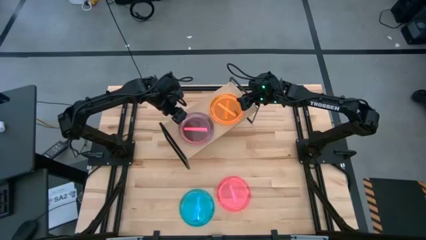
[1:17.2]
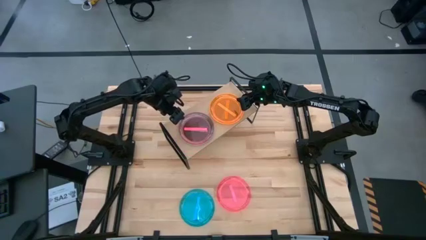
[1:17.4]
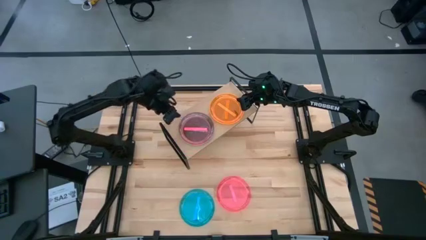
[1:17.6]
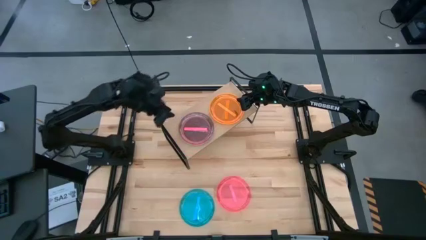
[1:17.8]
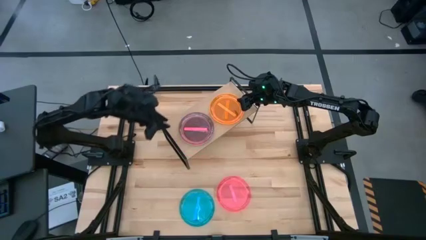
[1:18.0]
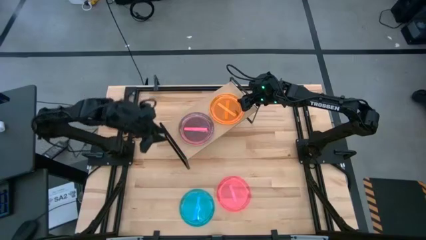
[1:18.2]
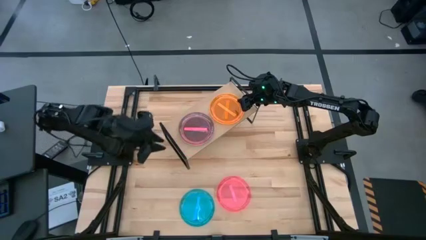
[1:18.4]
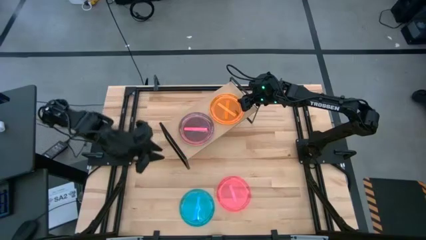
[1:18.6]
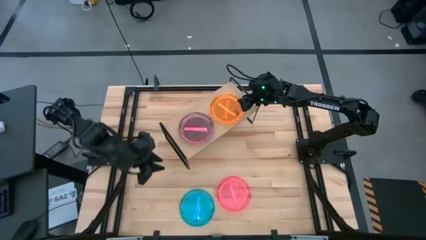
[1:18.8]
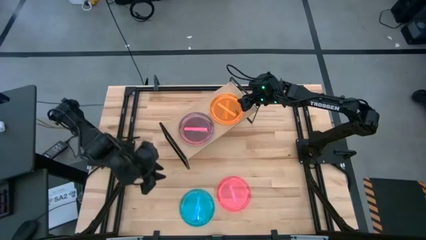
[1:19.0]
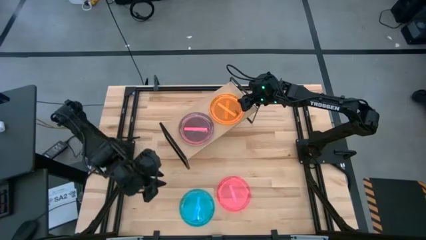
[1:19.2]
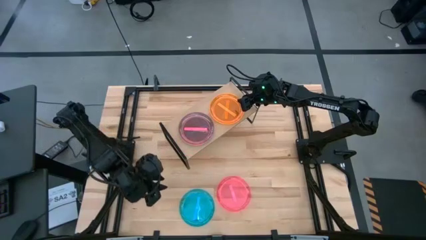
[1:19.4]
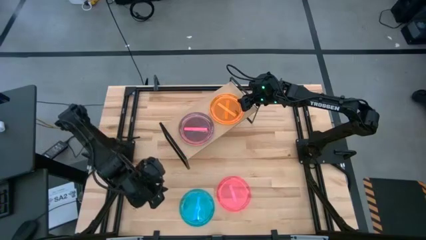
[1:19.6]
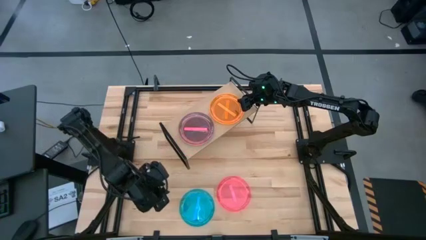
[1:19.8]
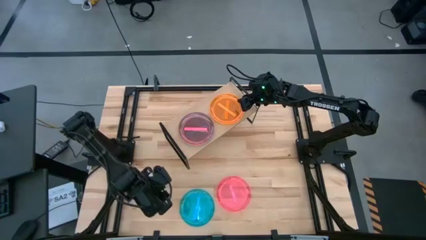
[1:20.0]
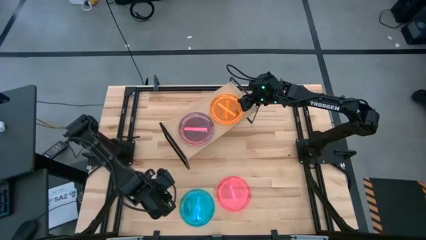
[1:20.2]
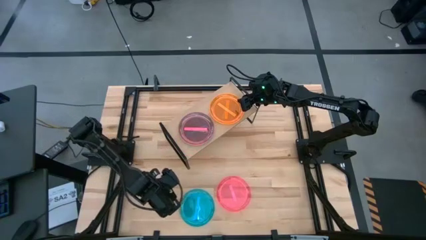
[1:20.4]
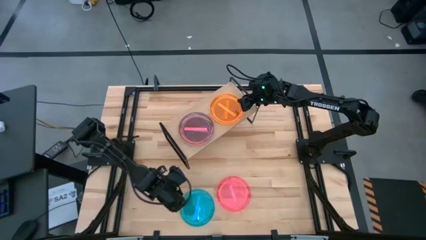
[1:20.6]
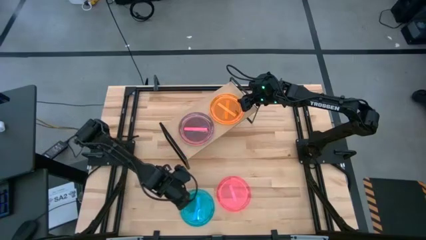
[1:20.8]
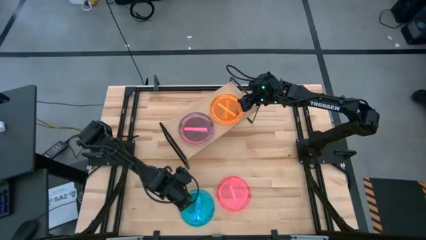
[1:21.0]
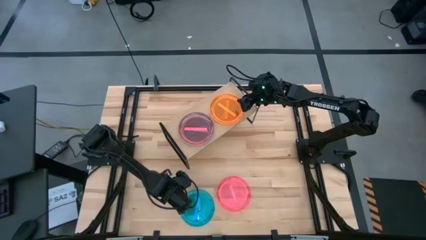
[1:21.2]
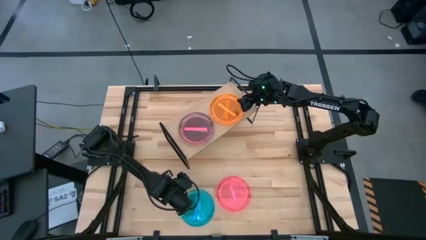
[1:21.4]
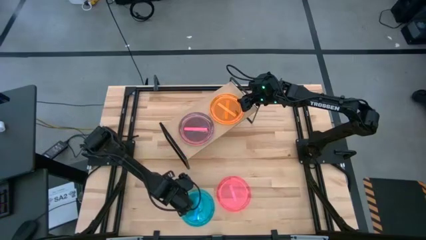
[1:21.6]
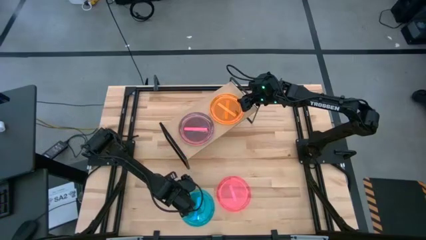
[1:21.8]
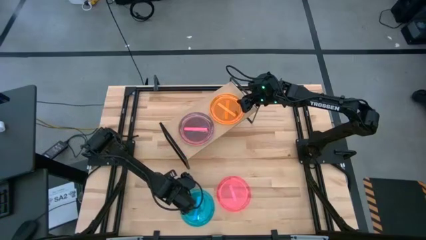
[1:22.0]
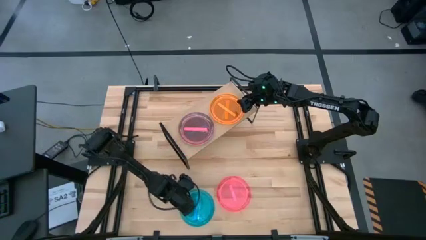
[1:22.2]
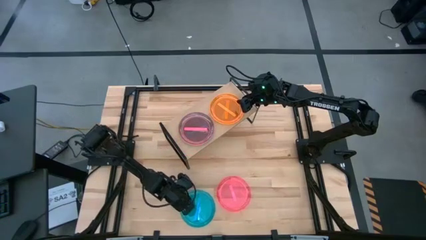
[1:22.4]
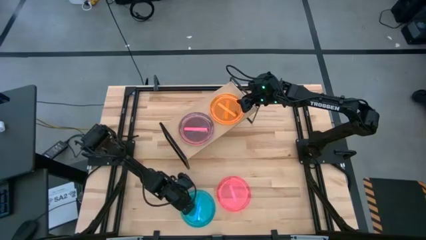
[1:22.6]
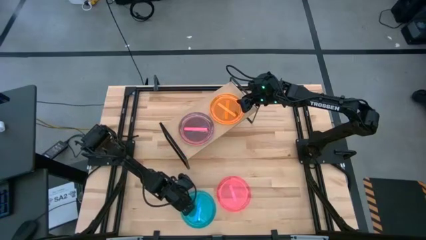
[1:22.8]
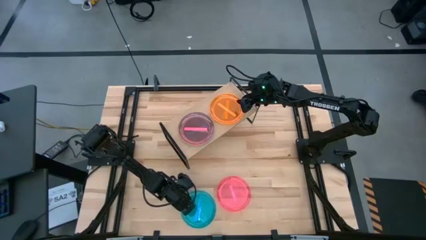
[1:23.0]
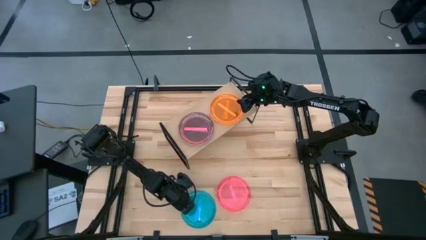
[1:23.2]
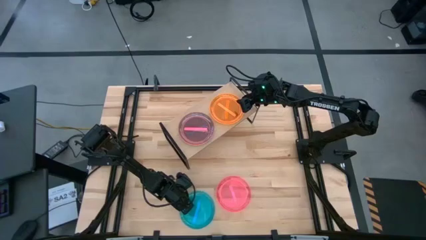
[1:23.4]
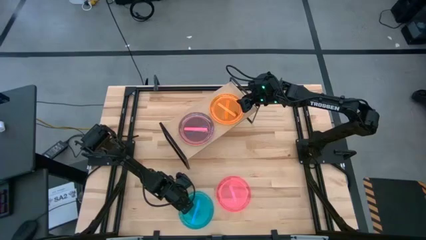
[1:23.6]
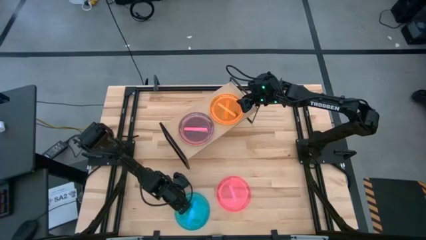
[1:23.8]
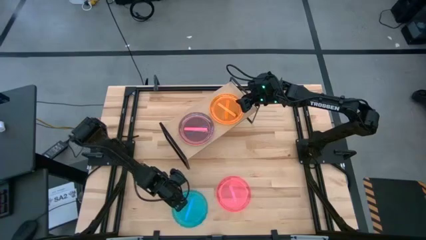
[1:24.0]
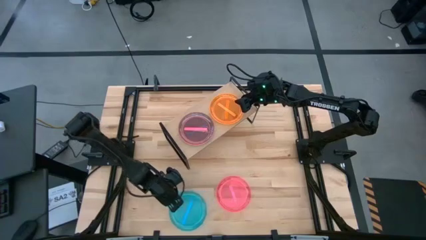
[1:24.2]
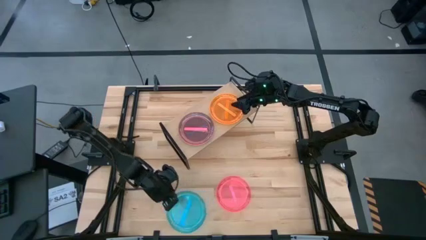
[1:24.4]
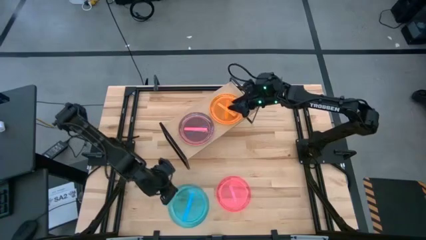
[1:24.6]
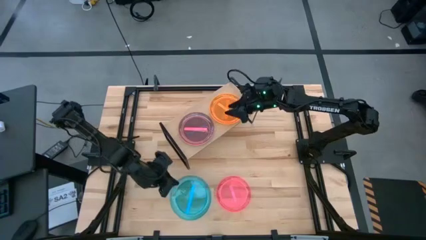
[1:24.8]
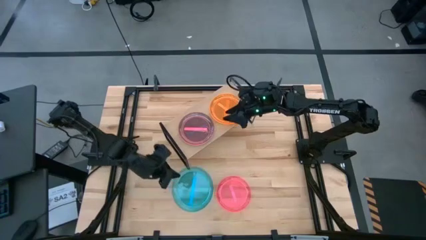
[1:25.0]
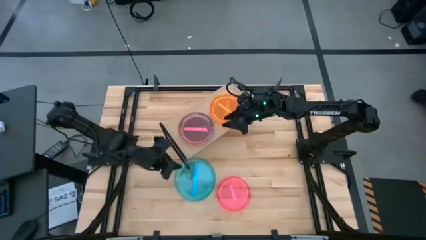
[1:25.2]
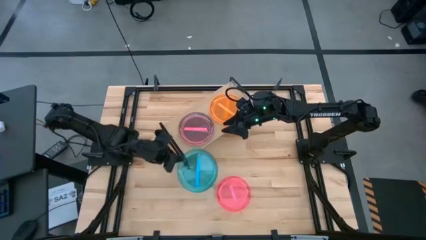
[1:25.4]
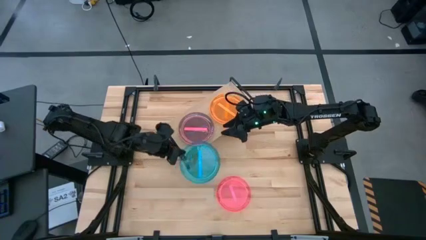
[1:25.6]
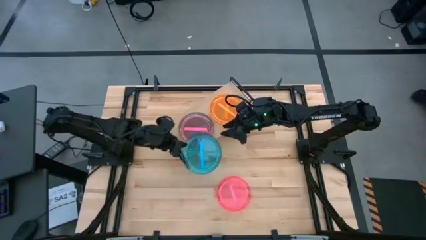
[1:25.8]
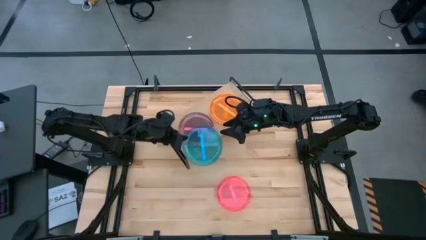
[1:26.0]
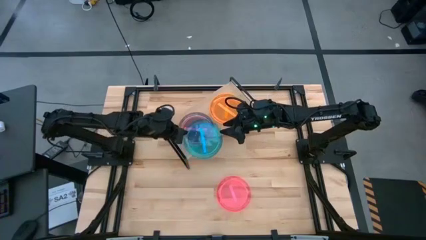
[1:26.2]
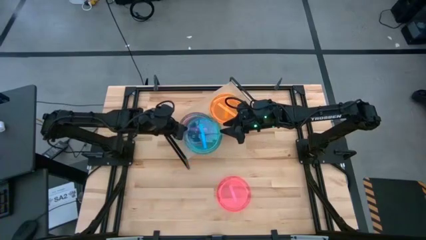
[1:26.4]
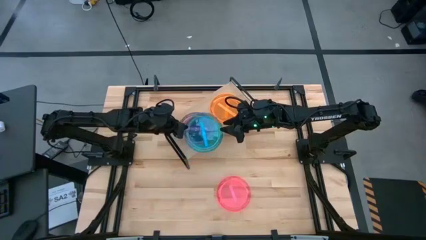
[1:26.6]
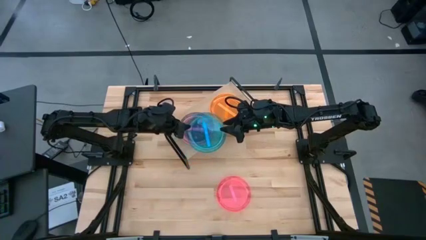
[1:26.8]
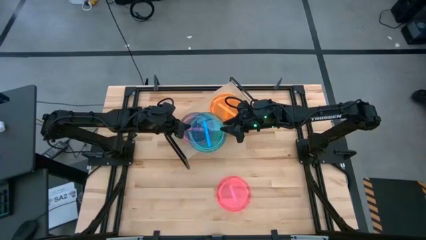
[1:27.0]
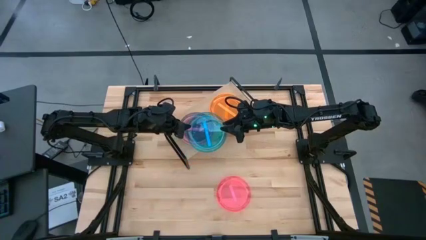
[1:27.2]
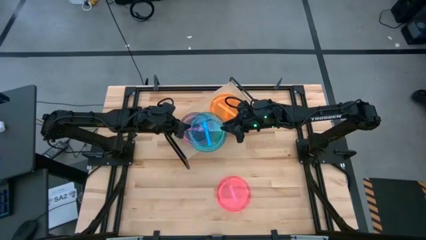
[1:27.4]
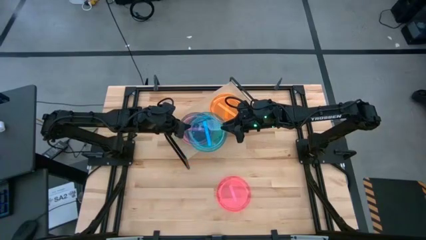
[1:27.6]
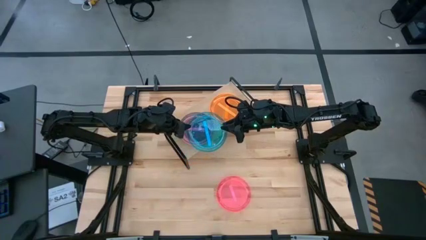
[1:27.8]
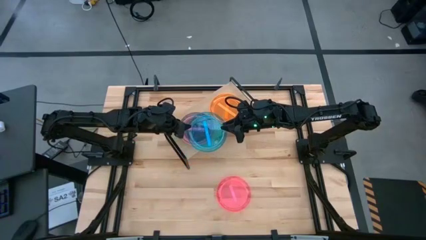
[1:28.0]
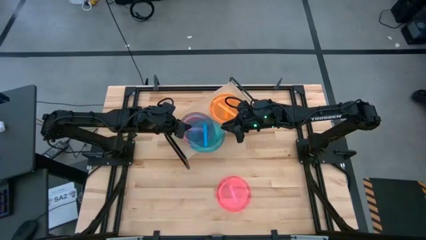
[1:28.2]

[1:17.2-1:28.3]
Task: Place and stack plates onto a shelf
Stack the blue plate on the orange plate on the shelf
